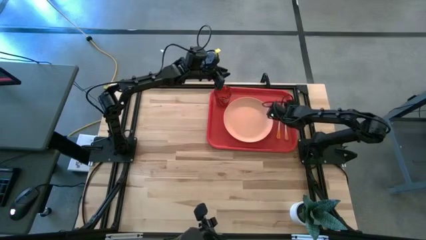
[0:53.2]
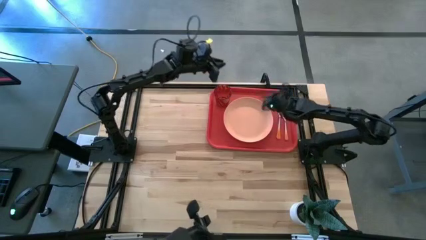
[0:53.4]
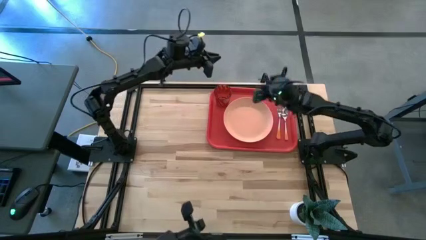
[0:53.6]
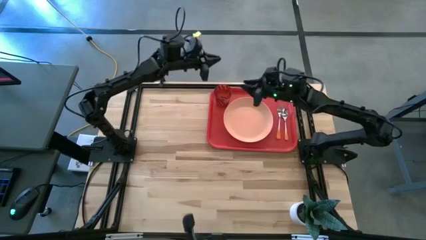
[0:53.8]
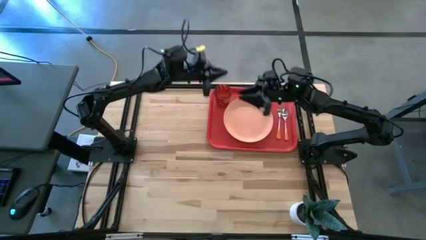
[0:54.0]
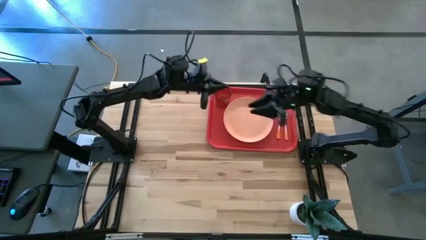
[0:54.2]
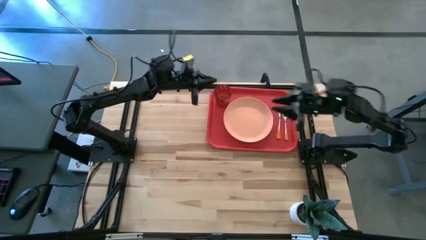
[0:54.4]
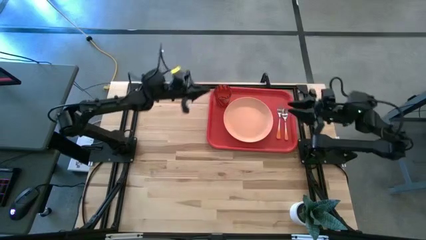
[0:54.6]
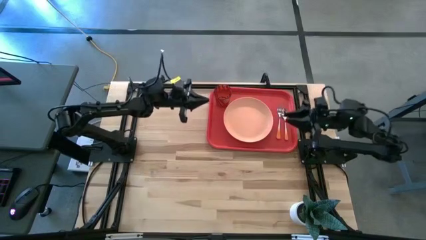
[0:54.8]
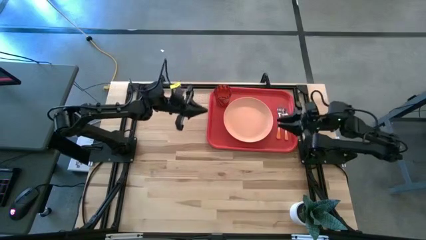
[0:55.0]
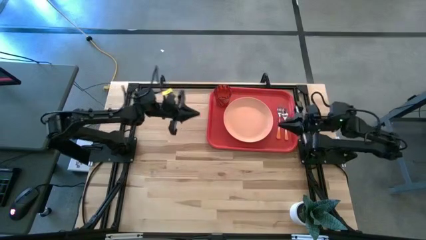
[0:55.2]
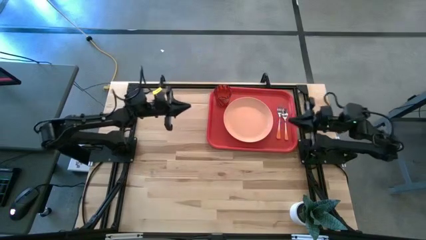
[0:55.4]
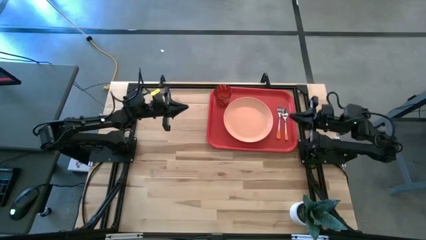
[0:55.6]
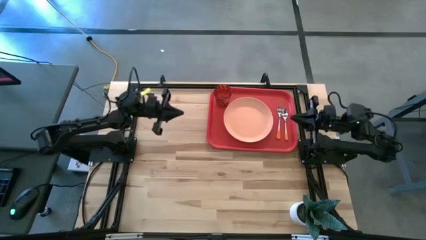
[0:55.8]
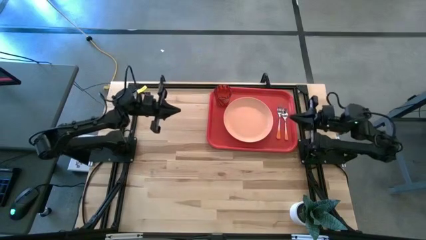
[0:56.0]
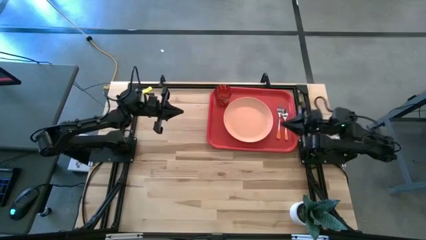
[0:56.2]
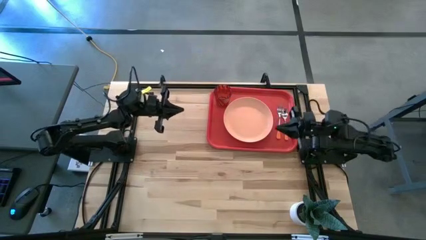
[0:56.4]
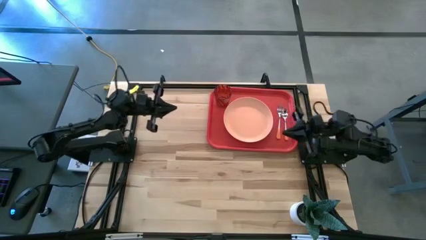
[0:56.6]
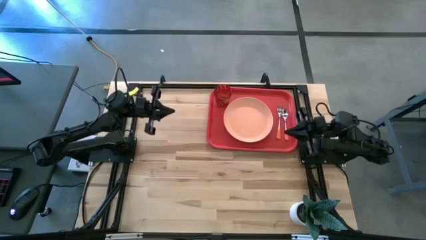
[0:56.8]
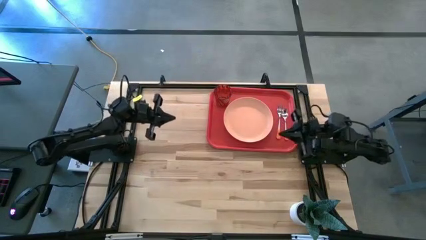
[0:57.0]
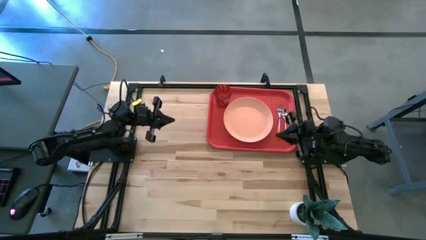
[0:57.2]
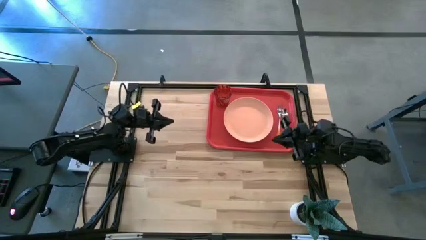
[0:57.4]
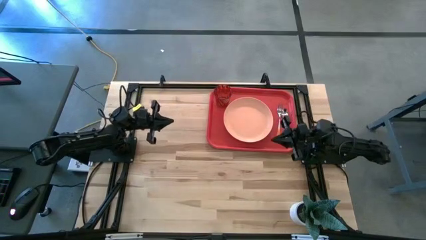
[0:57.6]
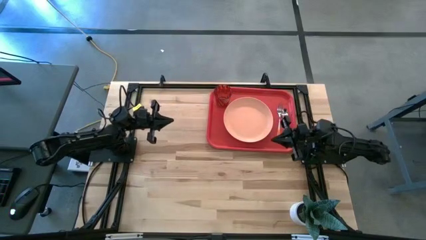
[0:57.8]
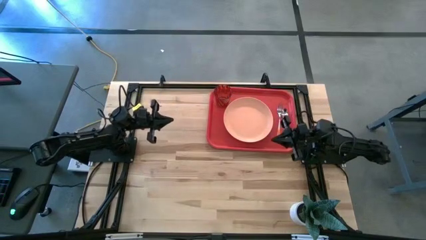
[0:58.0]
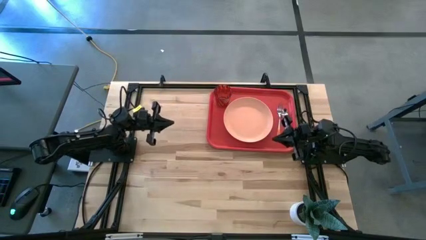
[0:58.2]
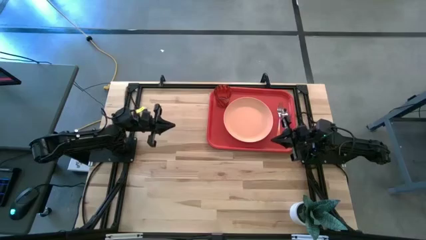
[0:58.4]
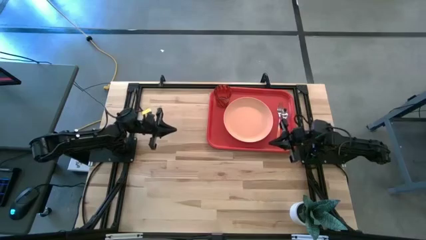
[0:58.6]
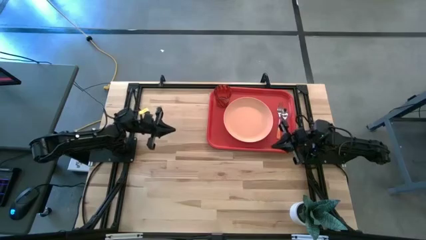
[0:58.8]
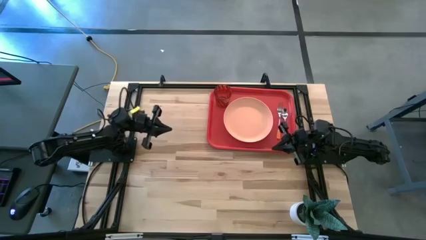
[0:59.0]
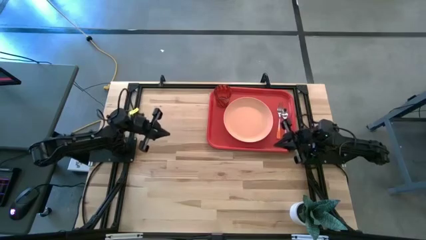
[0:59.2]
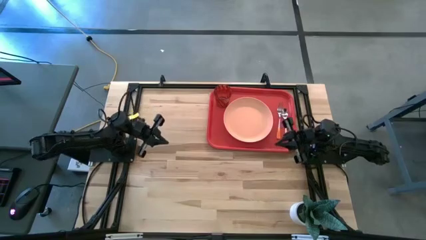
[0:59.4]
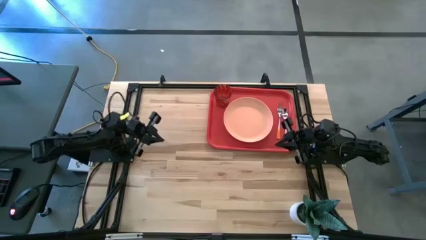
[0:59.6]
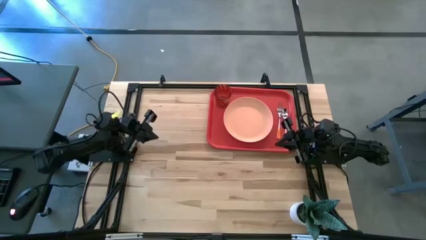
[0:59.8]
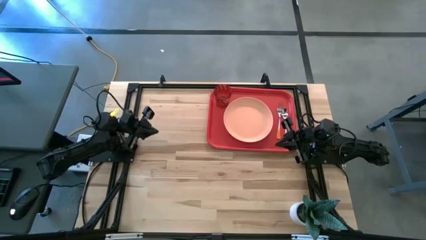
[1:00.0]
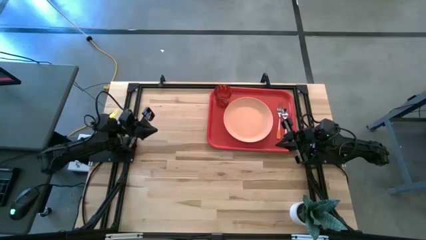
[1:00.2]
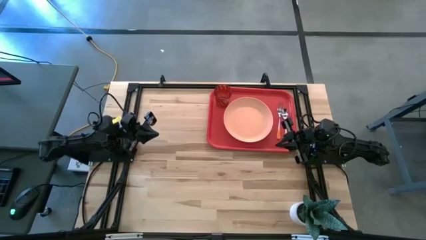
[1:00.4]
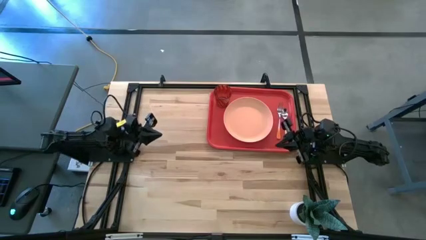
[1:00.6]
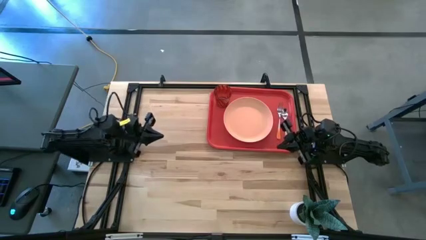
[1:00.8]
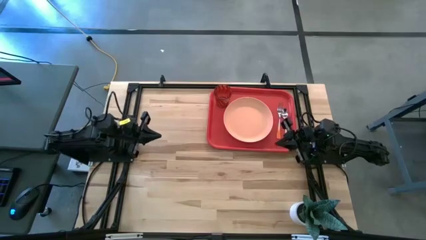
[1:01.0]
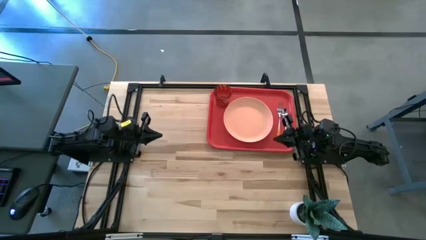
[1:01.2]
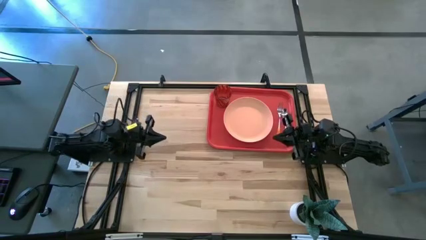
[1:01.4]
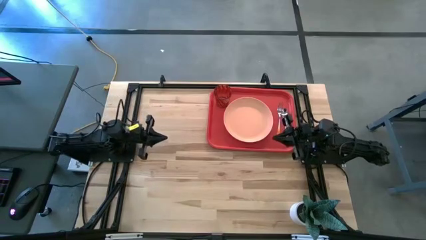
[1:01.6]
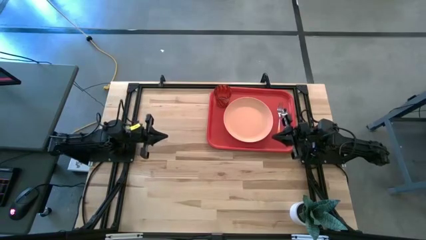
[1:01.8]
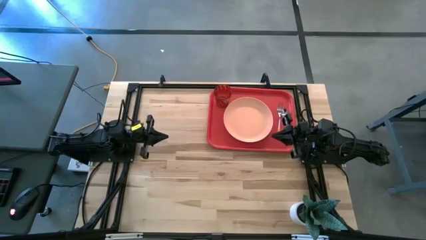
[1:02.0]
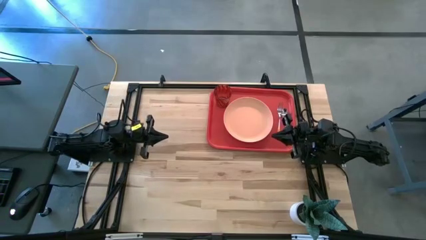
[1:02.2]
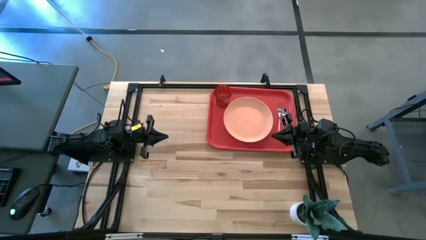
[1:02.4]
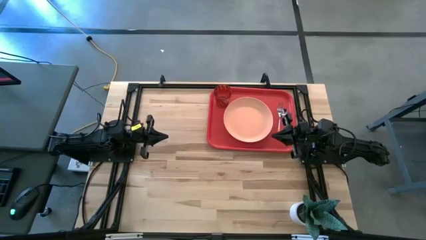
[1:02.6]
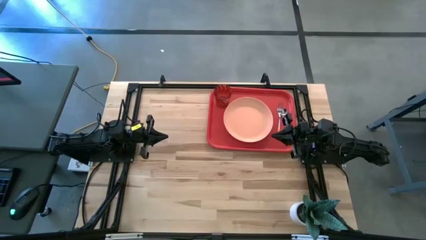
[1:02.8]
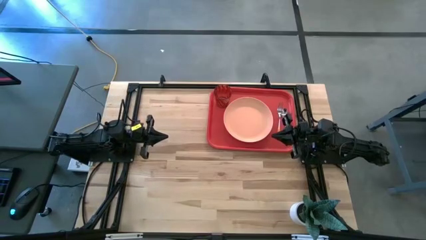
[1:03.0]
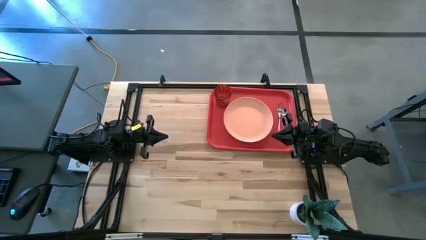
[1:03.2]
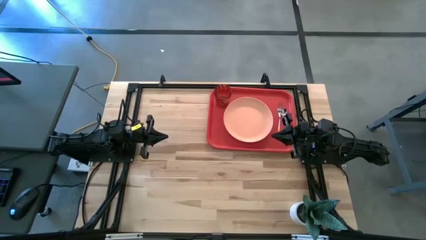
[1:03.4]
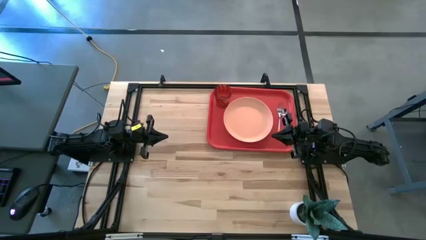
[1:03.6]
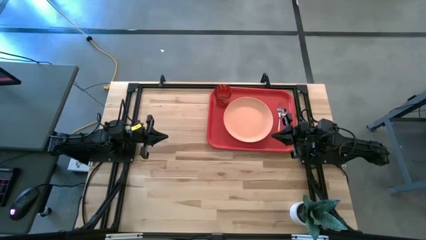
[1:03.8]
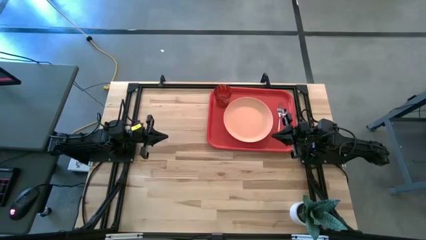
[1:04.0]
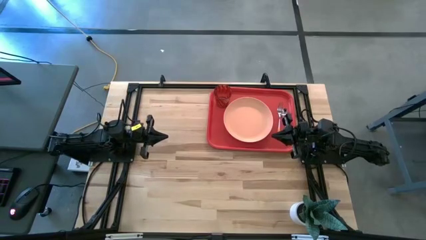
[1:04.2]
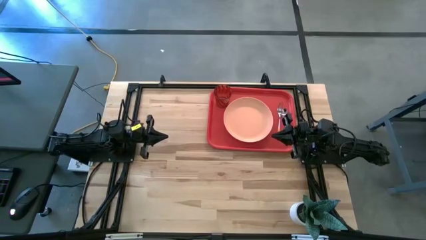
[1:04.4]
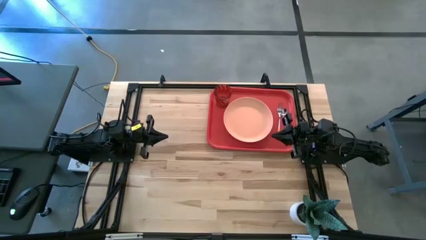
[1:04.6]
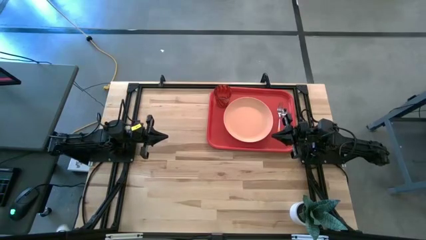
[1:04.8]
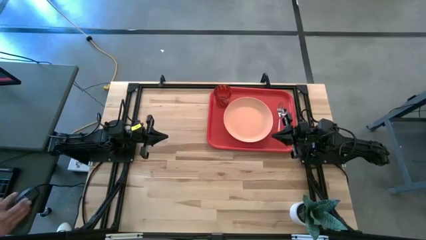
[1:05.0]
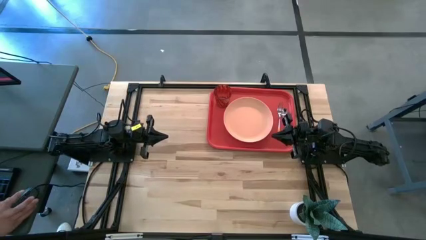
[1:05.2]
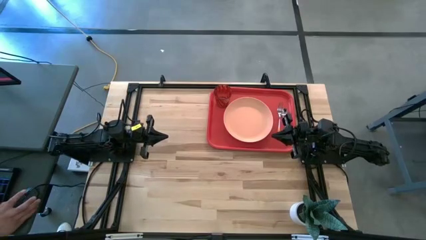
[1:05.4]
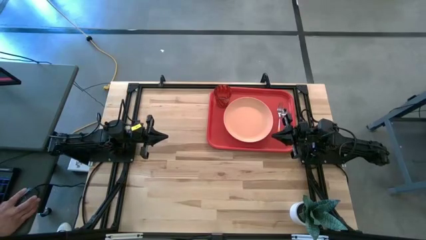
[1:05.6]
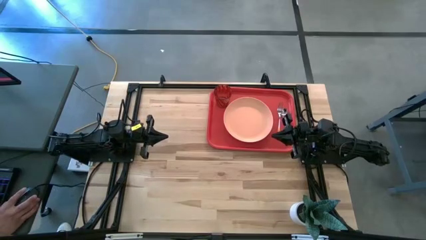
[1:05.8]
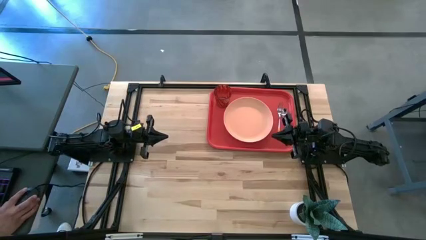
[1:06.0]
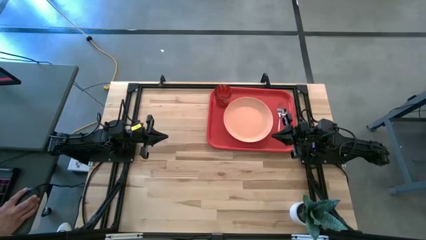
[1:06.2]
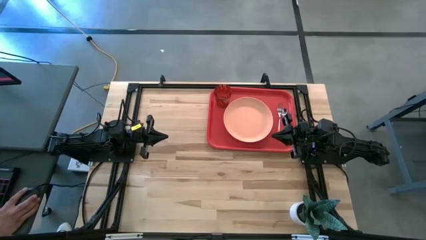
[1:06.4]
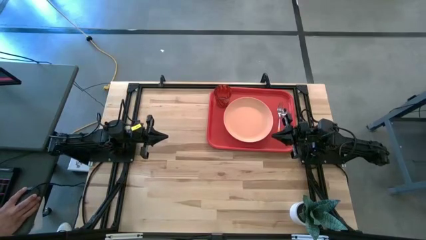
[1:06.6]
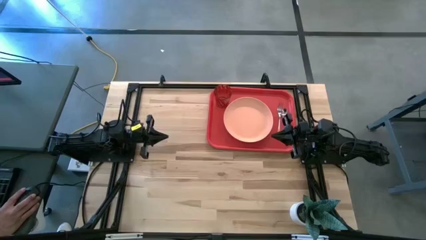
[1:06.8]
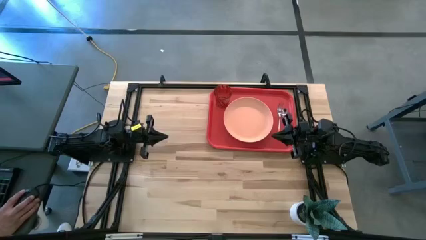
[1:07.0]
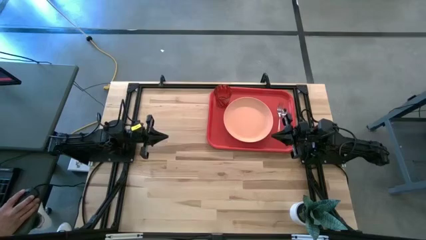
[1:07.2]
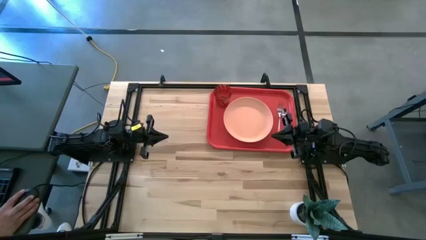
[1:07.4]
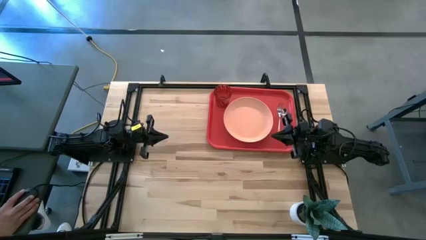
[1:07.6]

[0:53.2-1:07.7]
Task: Pick and place plate/cup/fork/spoon on tray
Return to Home Position
